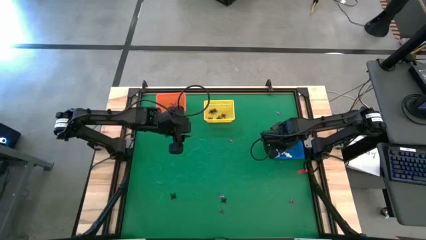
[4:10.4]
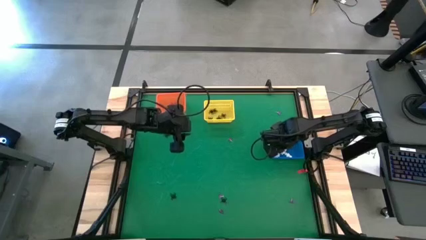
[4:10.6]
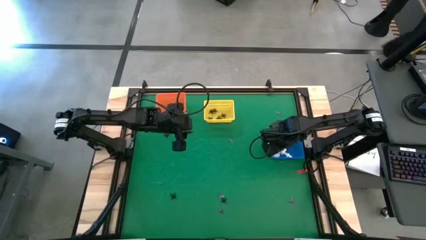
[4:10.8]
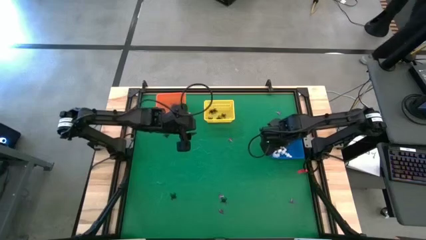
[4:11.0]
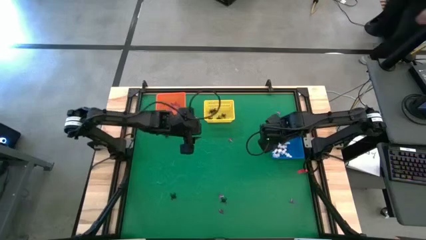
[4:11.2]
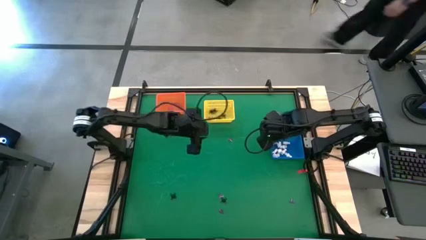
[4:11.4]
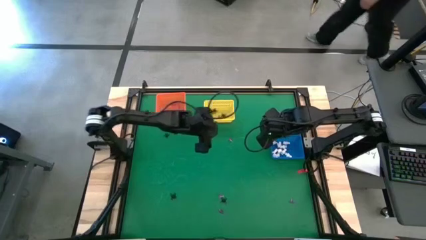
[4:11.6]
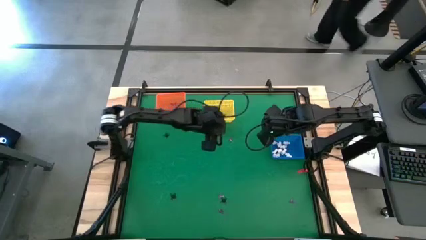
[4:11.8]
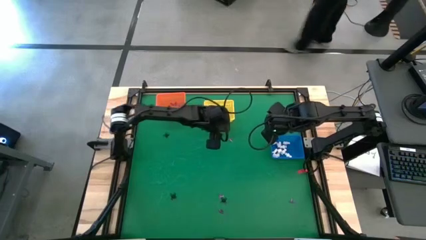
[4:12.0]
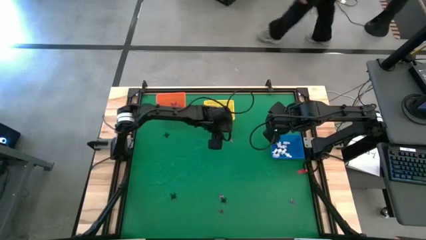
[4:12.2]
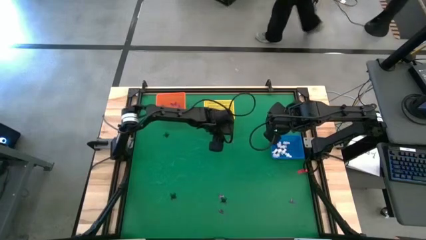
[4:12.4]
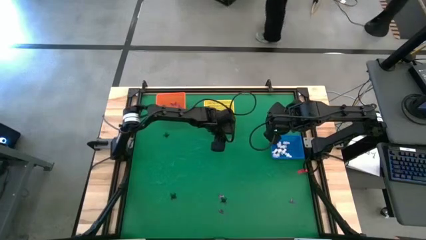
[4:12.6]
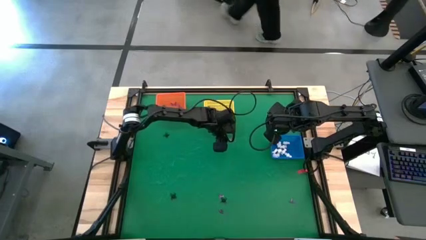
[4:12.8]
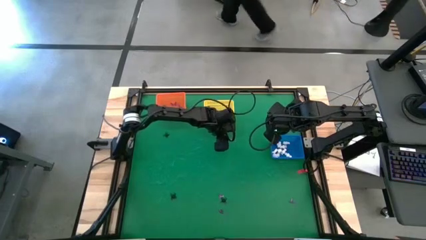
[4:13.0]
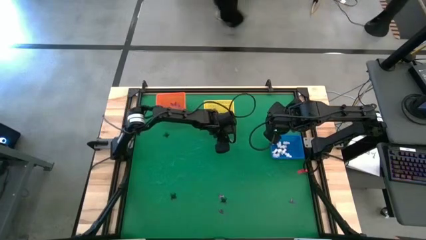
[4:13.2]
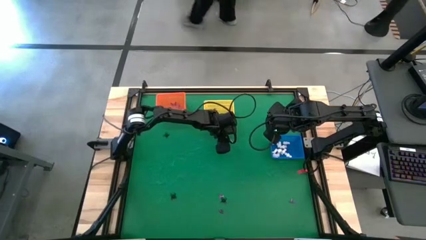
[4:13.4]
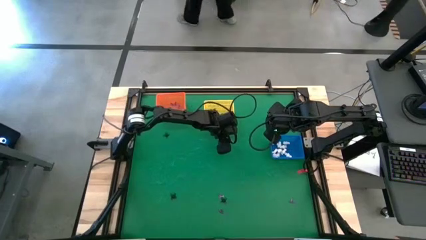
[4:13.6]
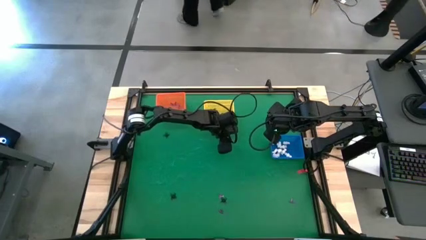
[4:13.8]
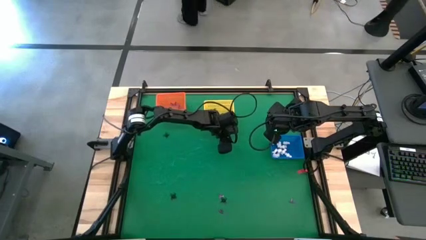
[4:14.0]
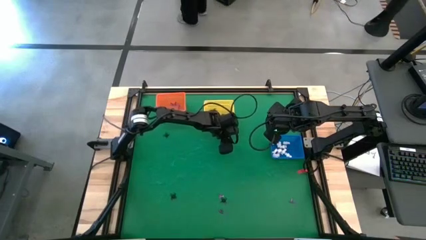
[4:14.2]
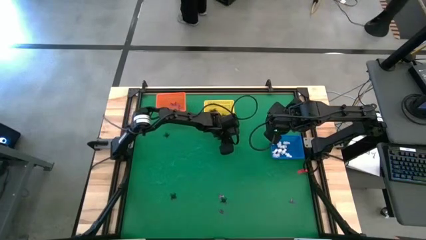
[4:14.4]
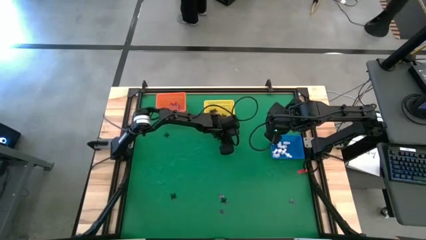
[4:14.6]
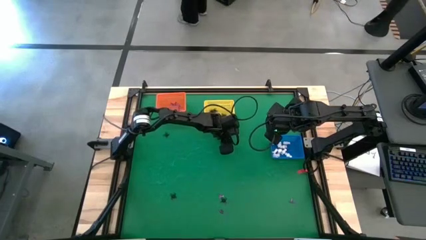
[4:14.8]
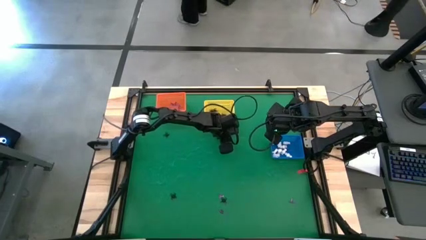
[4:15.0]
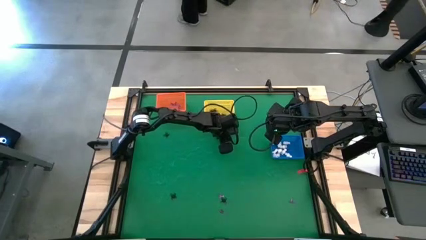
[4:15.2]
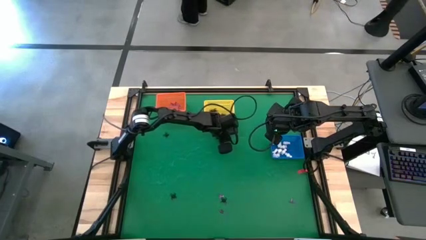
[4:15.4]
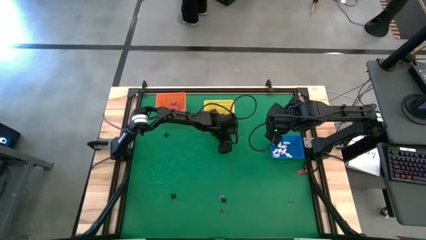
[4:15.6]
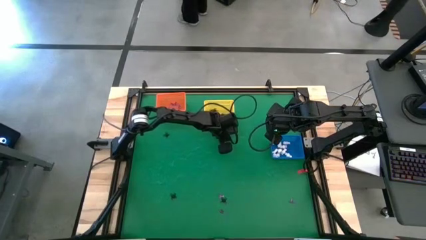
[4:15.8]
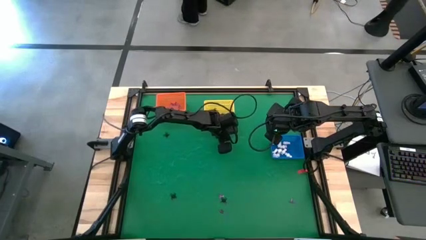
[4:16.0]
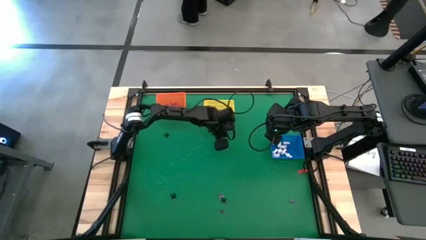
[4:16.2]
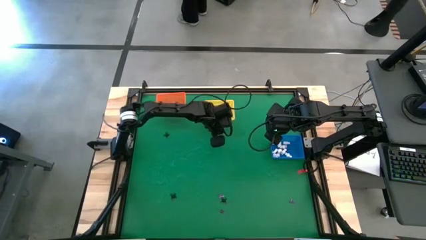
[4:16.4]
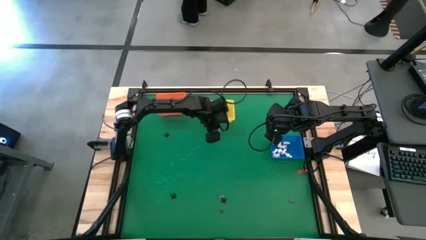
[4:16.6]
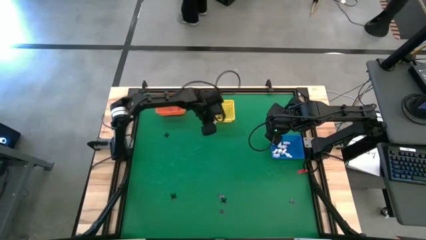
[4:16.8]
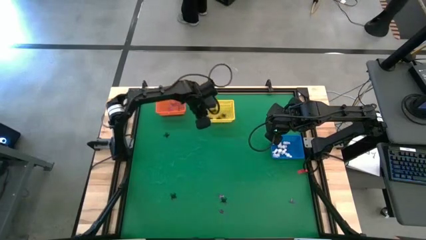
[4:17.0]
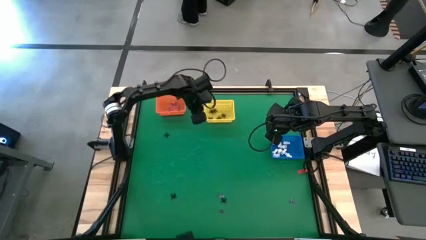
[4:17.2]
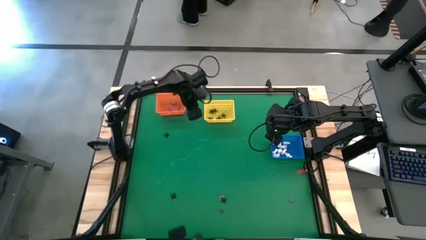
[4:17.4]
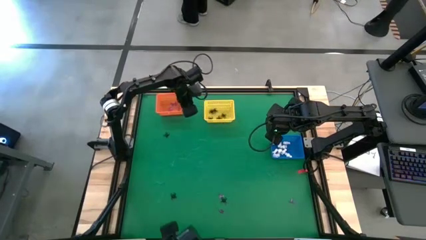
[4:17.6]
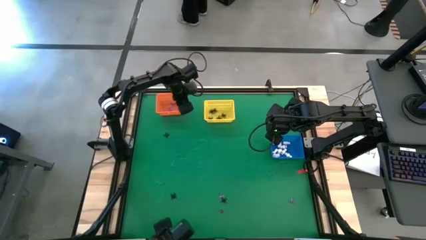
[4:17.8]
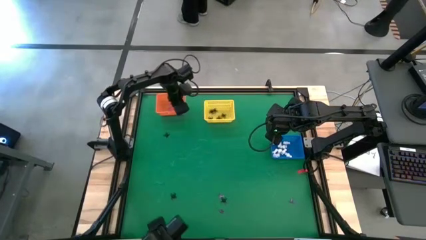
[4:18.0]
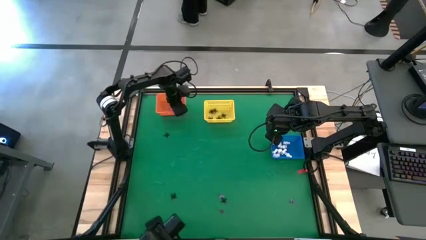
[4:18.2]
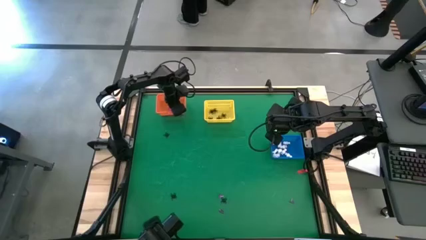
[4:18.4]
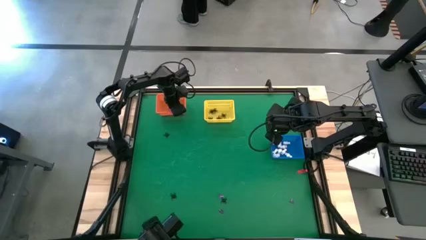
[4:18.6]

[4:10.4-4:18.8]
Task: Sort Halloween decoration
Put the violet hat toy into the orange basket

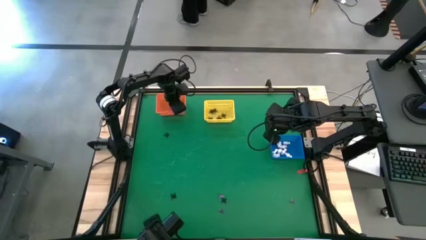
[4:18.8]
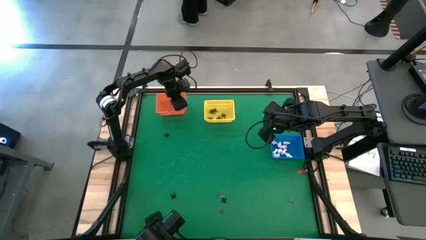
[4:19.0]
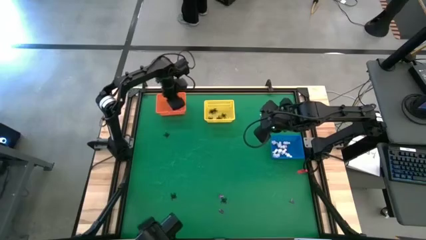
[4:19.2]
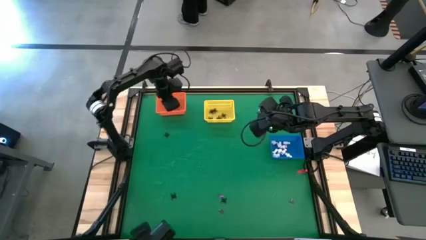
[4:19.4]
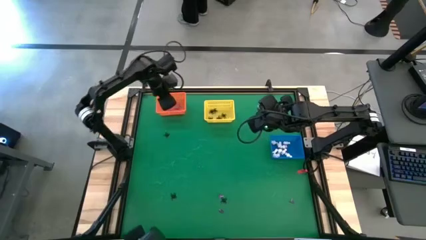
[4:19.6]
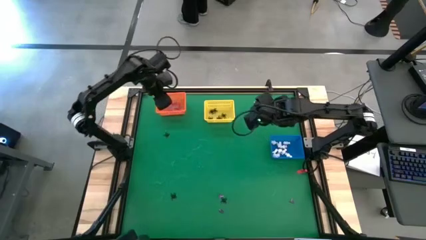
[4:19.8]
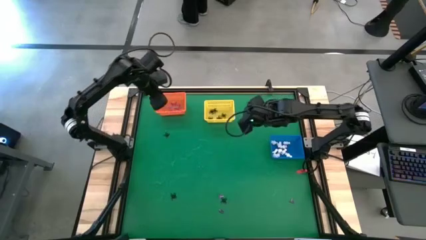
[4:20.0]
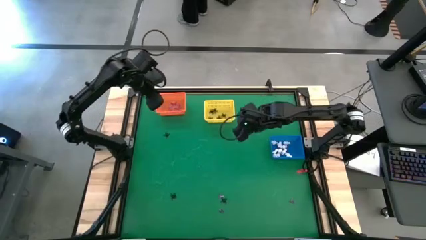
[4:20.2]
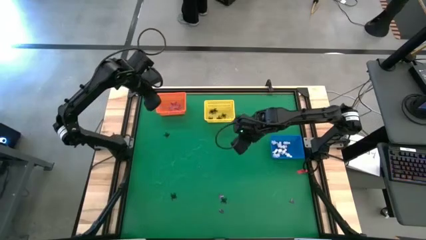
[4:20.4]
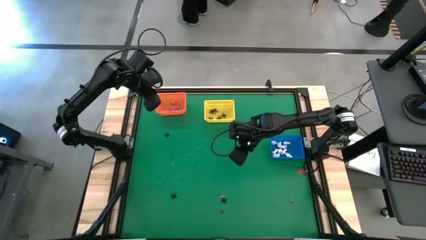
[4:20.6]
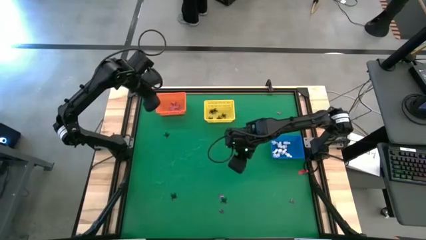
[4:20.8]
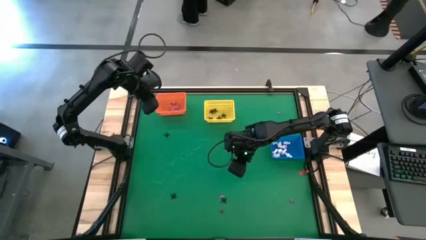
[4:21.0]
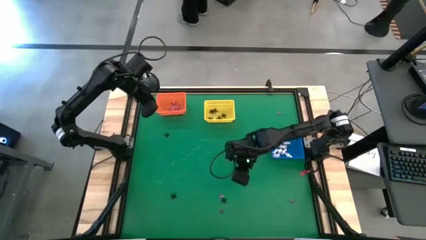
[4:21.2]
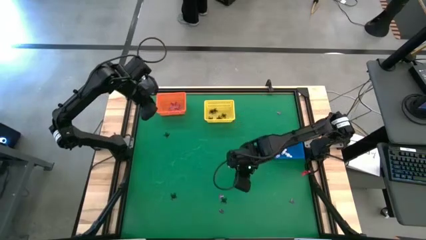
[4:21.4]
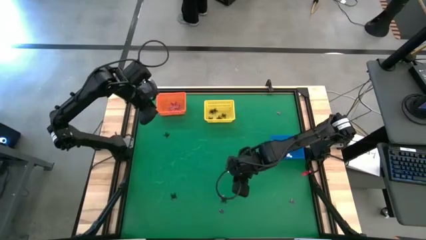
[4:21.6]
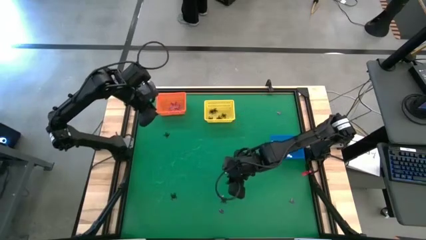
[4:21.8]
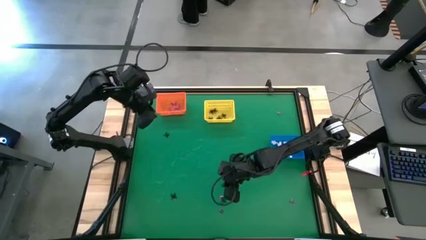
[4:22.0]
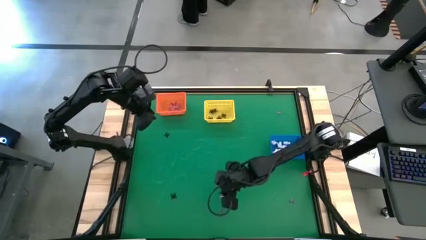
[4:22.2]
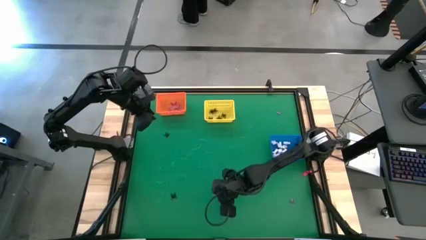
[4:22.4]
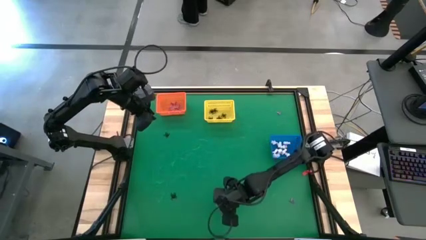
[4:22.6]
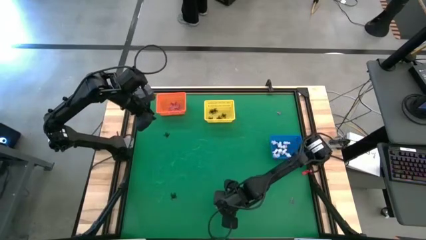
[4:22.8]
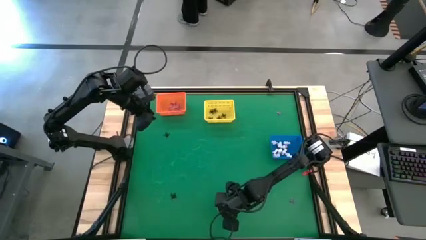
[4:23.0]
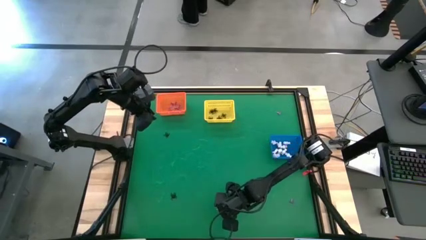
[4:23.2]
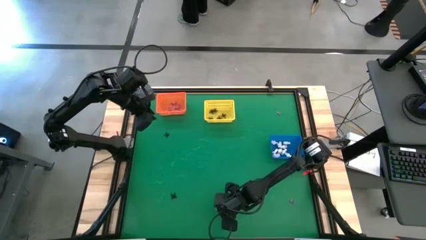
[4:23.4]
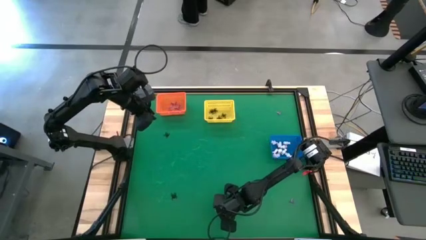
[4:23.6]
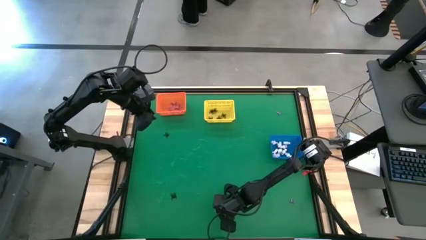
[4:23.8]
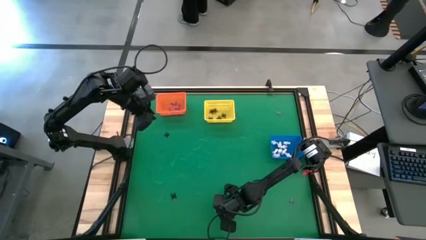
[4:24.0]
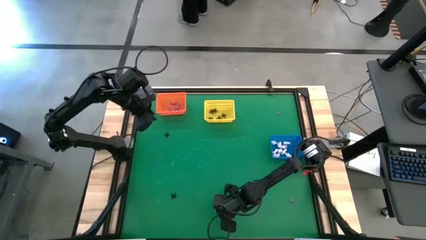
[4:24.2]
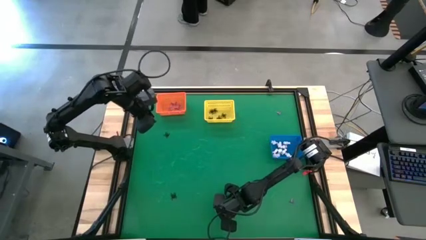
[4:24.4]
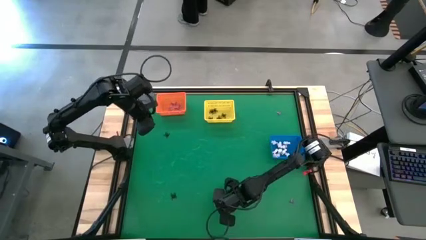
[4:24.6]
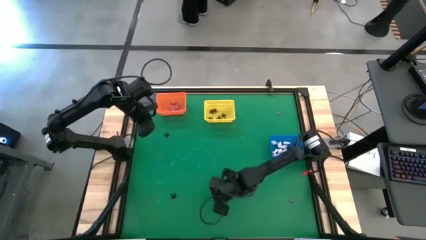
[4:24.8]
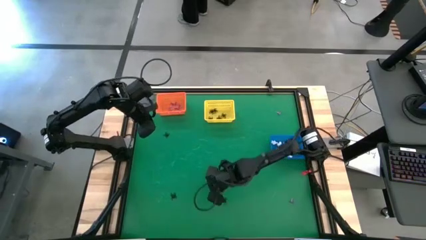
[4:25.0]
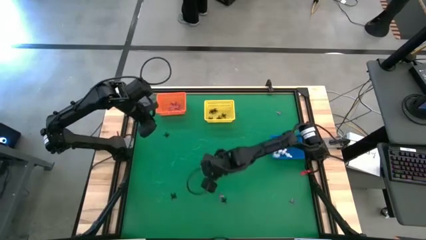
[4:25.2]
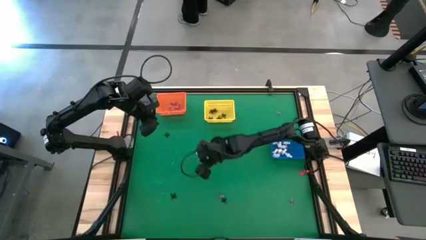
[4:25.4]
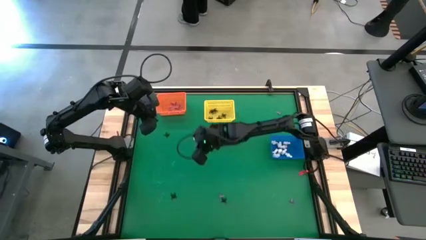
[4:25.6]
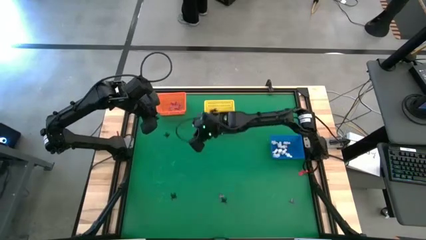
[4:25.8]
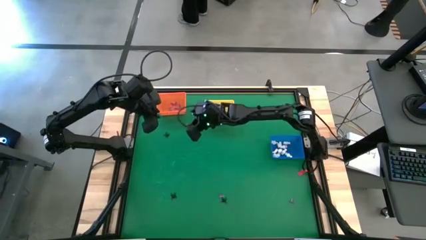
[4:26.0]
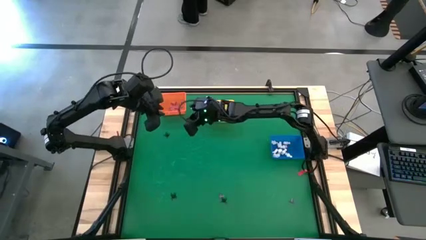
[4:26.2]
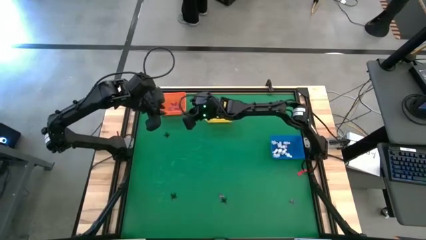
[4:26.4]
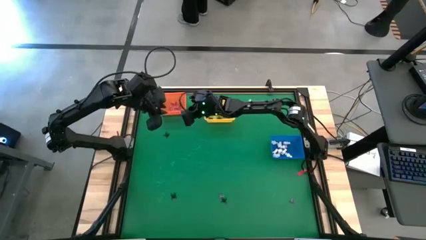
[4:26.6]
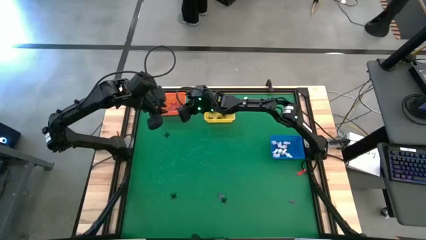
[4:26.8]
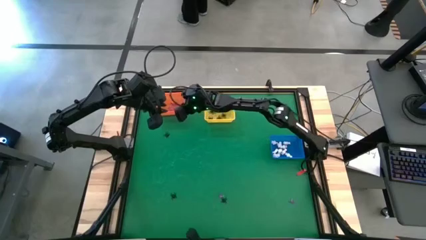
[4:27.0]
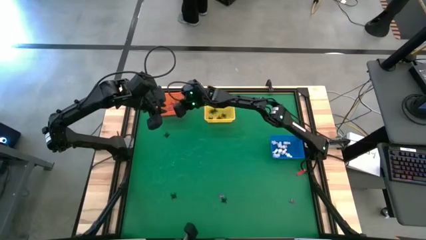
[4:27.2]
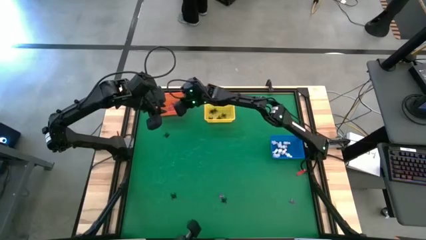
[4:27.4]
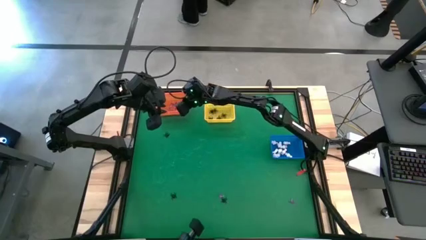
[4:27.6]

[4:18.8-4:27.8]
Put the violet hat toy into the orange basket
